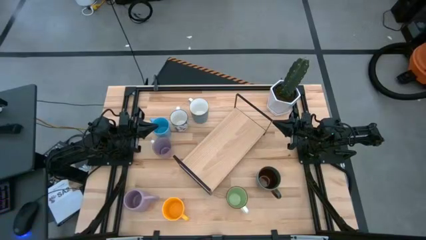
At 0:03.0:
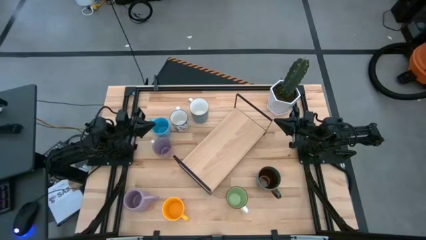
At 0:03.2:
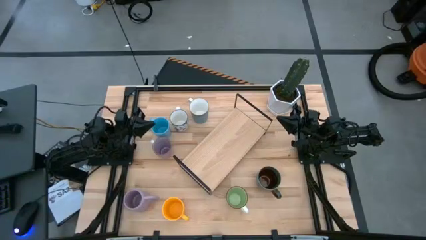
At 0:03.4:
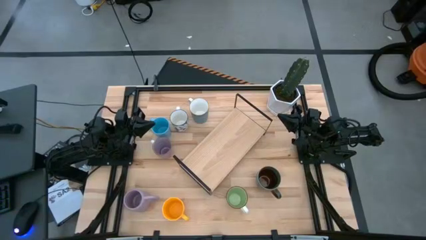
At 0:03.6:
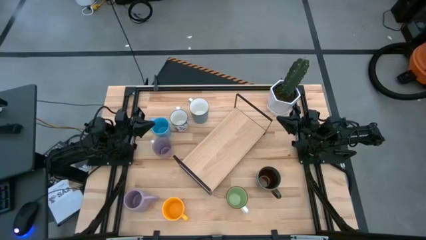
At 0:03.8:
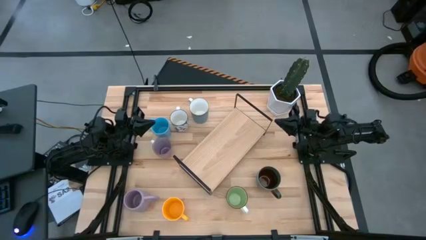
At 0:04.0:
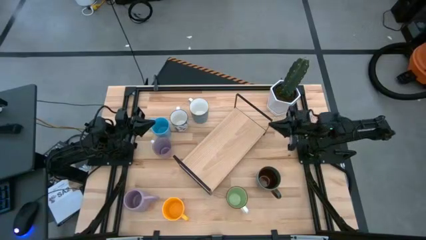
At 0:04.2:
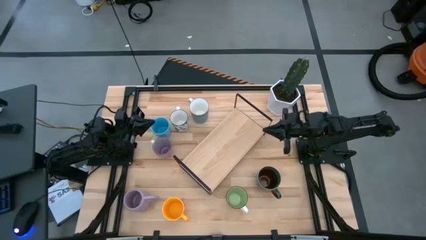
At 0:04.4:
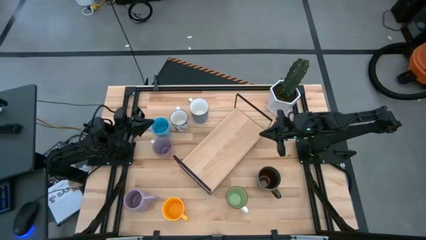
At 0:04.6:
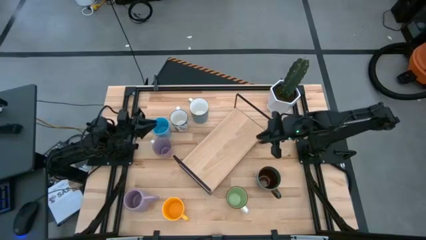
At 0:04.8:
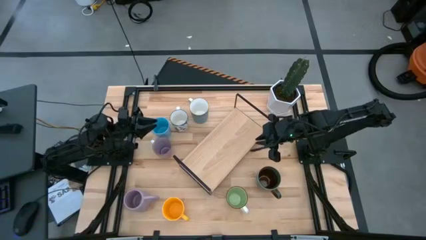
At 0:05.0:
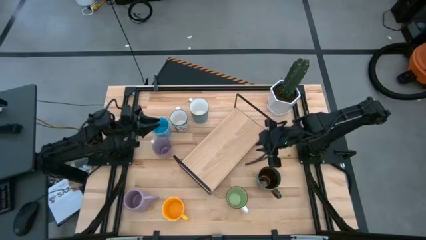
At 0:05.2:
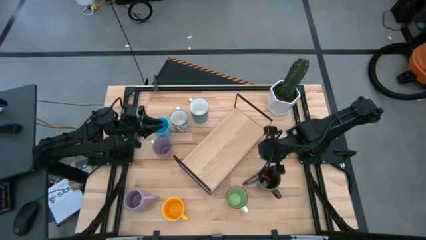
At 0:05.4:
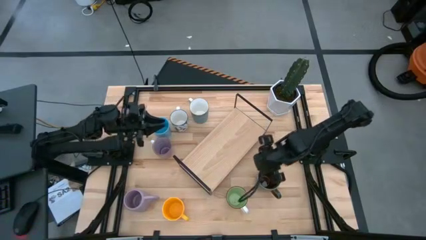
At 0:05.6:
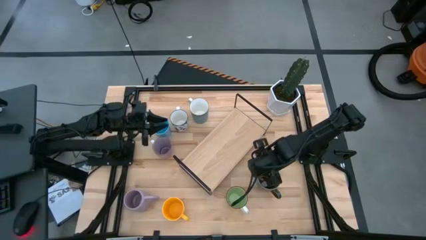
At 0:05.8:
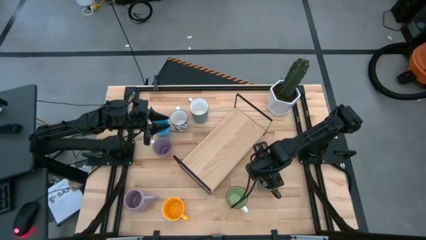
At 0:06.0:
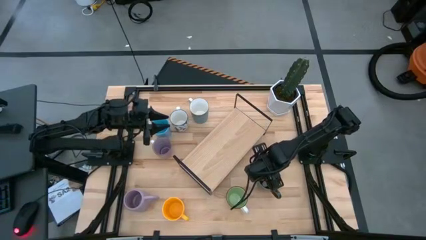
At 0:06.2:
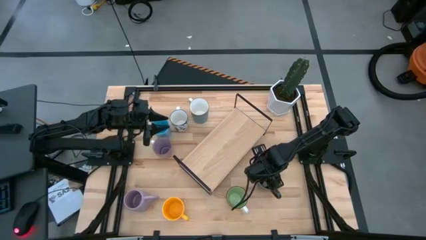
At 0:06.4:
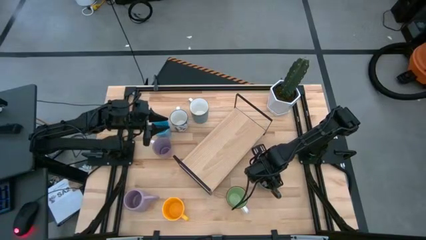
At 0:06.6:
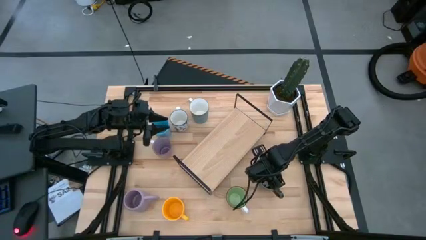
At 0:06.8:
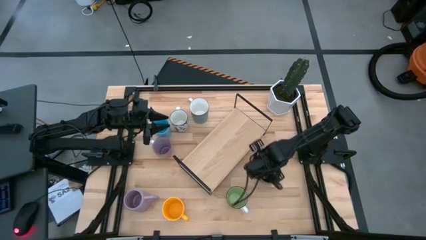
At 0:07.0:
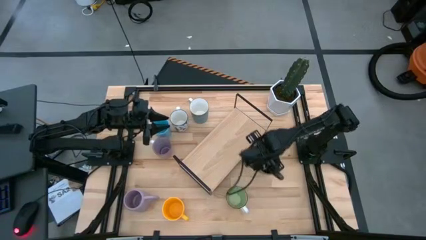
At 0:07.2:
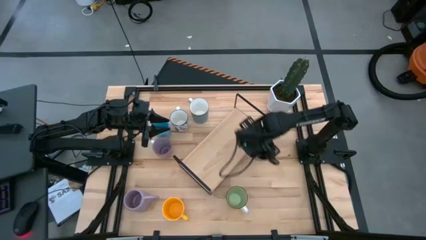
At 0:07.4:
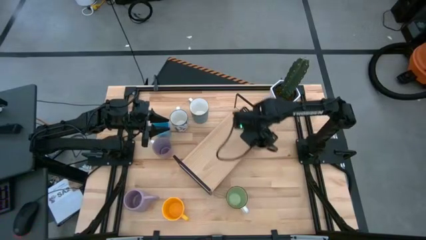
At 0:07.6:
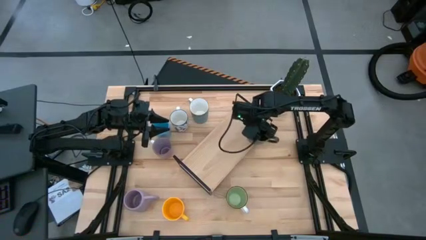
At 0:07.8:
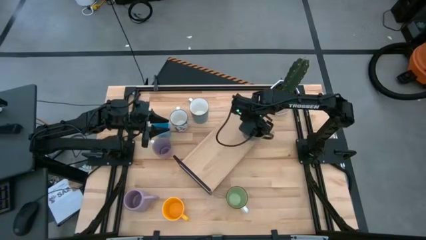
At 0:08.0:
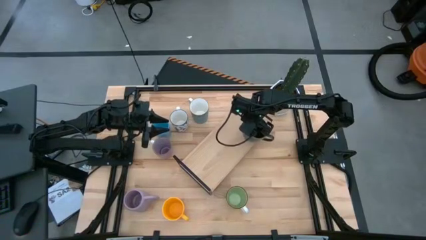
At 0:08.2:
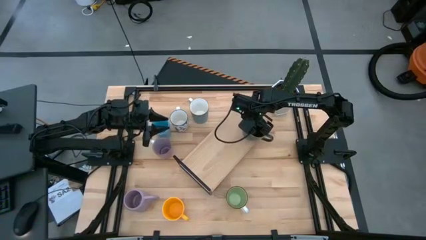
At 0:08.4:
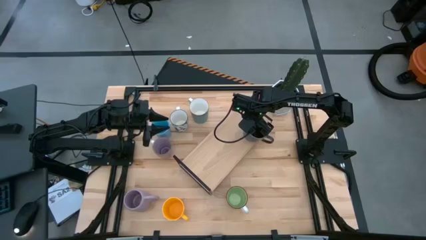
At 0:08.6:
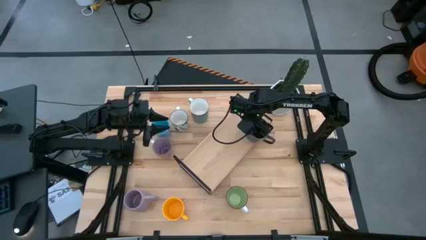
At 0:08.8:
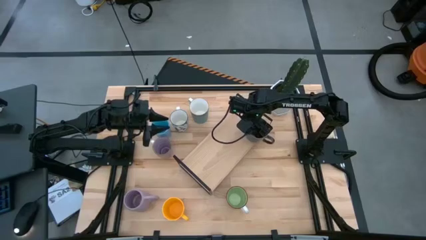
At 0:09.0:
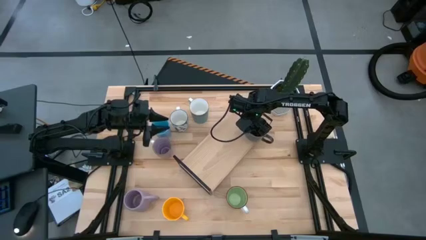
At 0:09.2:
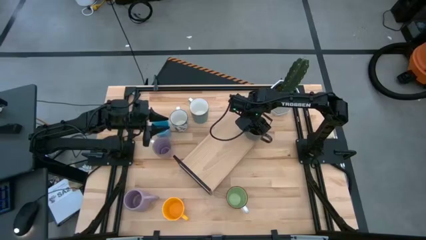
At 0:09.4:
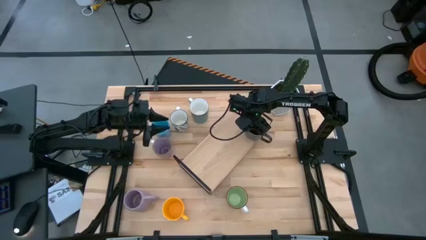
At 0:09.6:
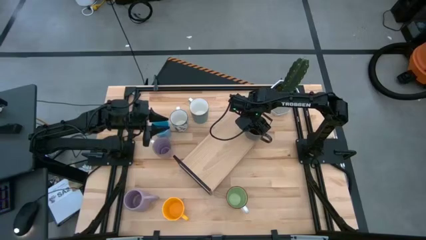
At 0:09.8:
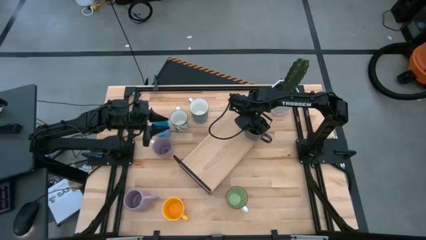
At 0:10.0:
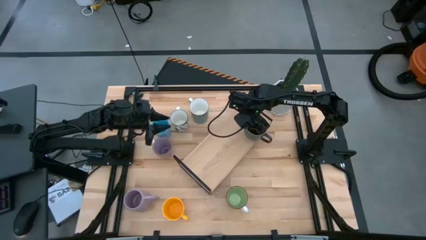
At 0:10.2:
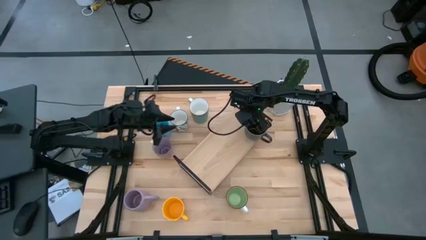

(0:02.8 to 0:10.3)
Task: Place coffee mugs
Put the blue brown mug on the shelf

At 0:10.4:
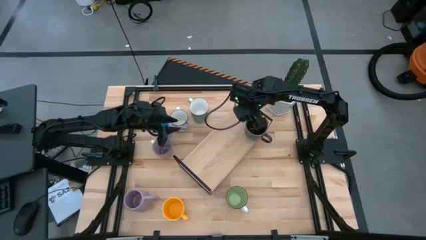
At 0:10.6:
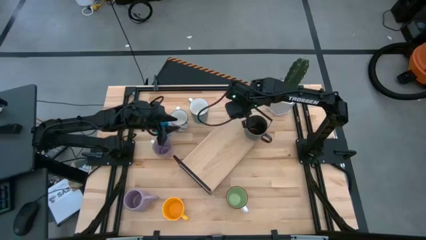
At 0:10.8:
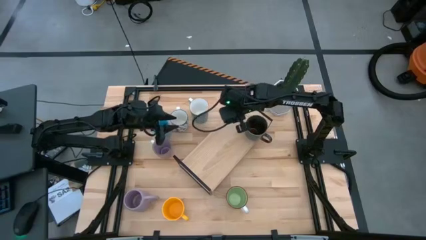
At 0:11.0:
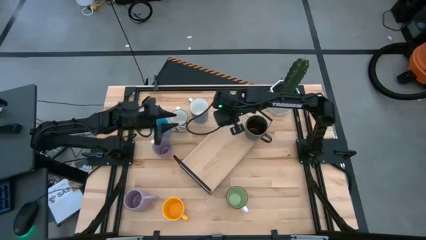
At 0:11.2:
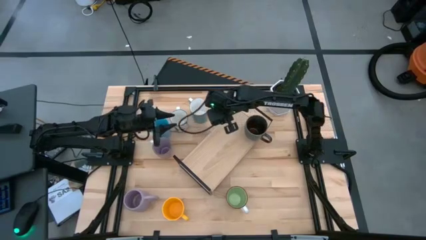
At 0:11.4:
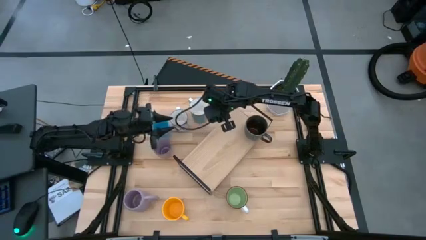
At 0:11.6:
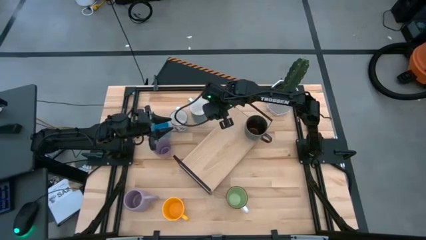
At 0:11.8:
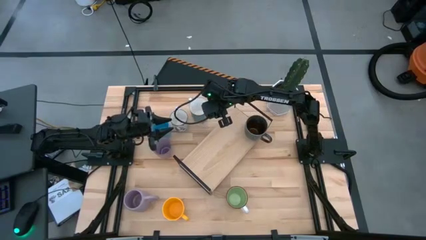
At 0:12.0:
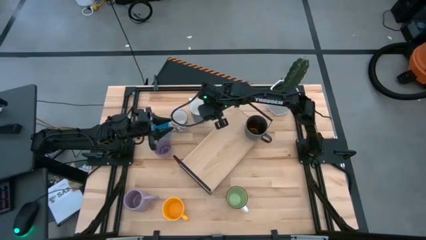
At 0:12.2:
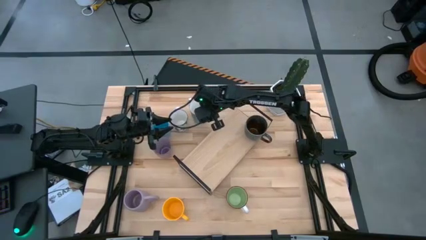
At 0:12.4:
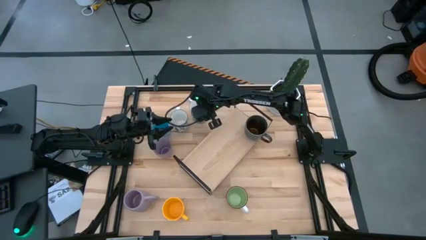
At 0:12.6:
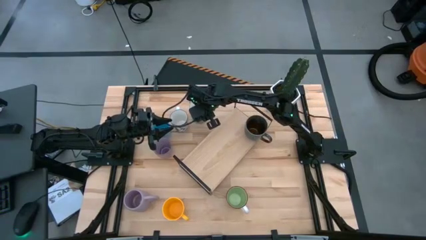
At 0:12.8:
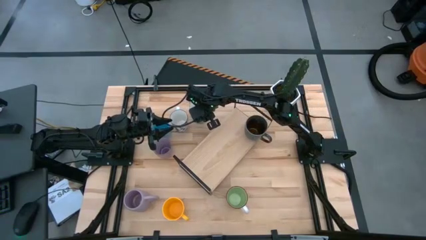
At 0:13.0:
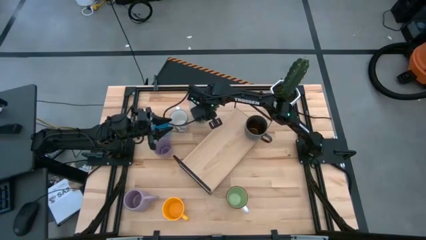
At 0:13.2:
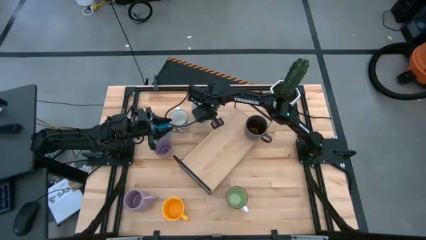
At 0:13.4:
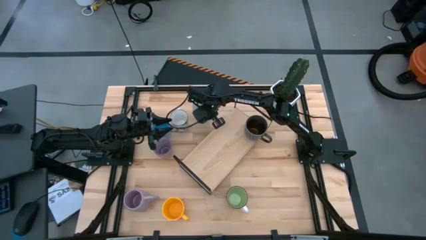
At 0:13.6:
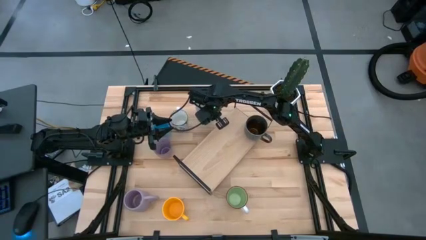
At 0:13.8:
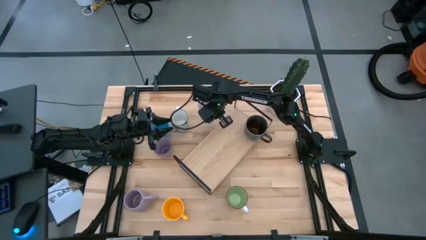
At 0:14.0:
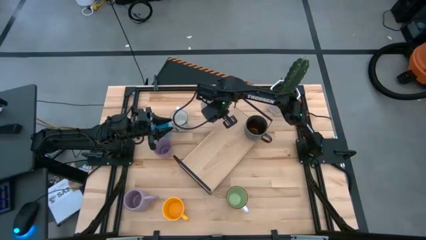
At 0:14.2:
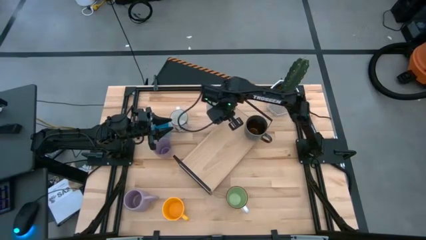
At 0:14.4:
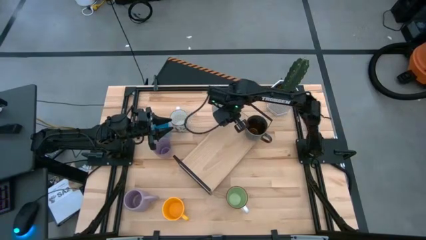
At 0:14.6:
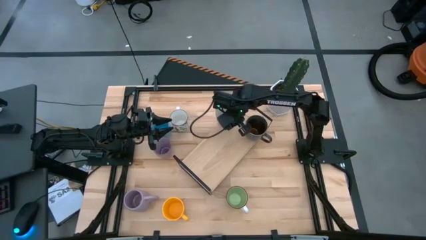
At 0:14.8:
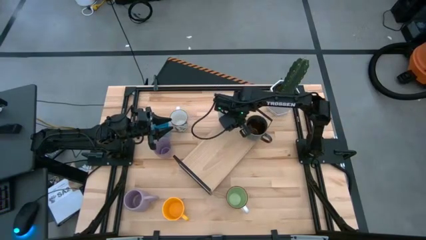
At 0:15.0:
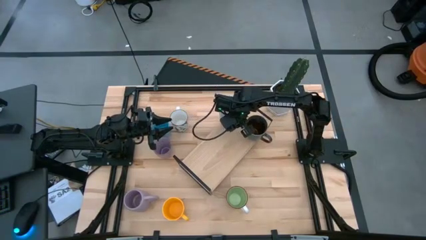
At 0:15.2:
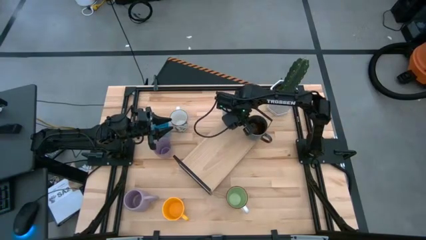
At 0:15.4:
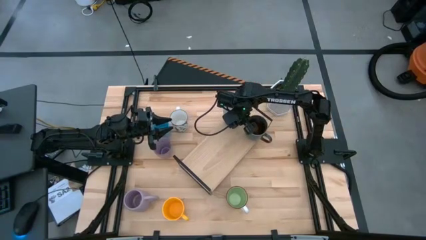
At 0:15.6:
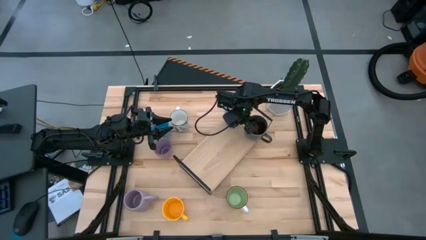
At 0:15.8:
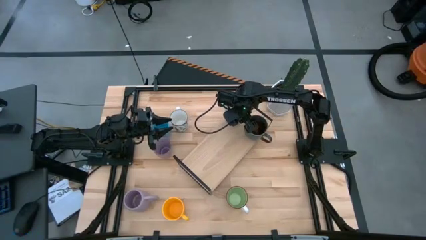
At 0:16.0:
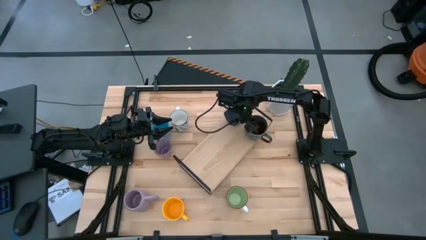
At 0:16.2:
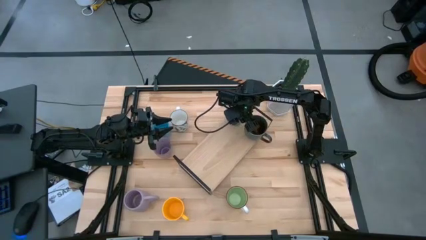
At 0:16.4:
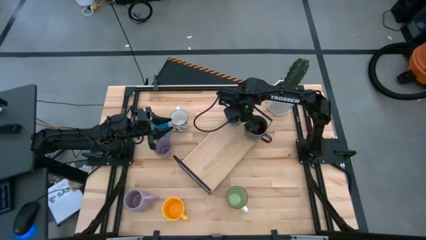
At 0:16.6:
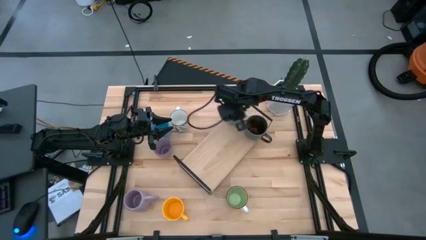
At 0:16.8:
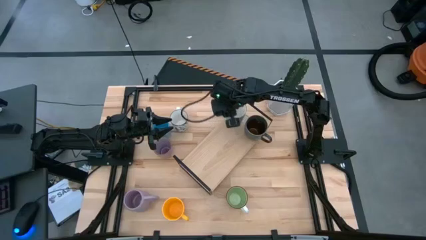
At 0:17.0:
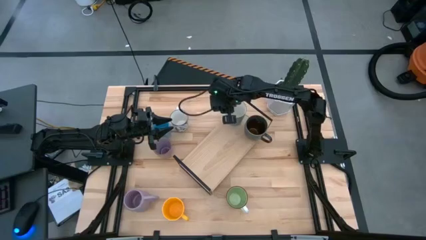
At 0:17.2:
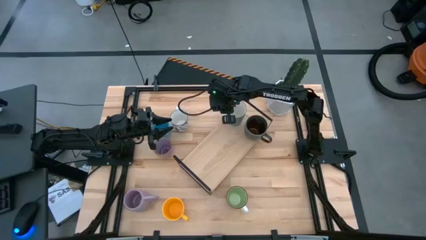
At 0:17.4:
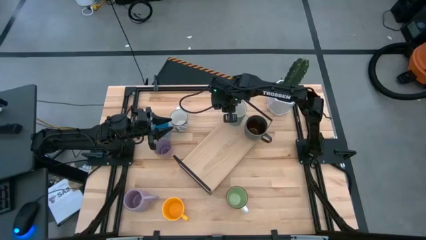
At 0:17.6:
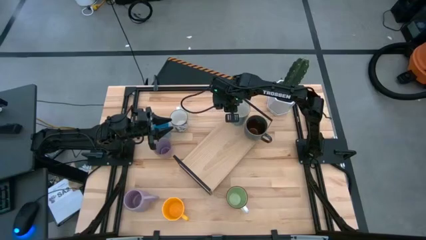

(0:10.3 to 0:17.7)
Put the dark blue mug on the shelf
